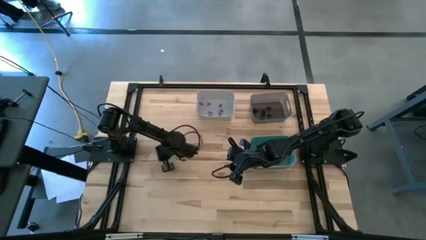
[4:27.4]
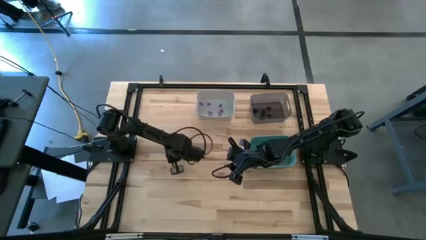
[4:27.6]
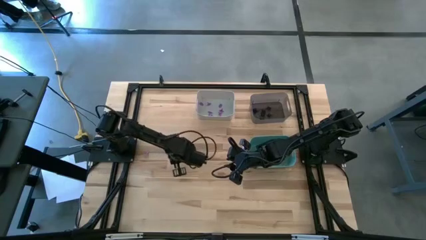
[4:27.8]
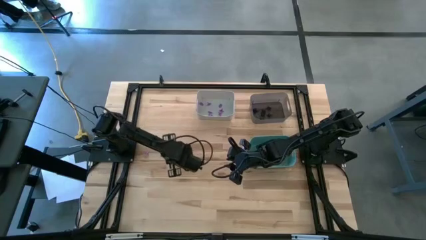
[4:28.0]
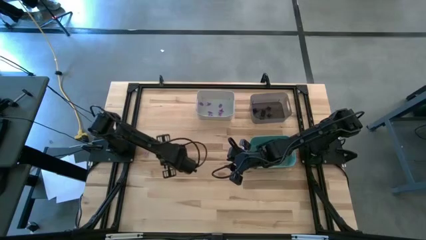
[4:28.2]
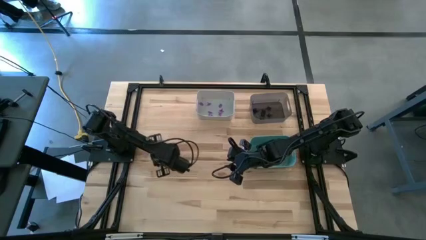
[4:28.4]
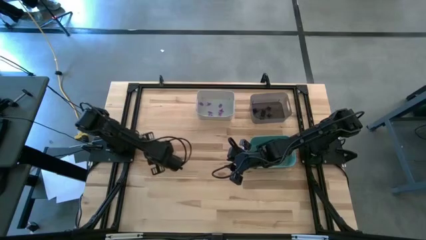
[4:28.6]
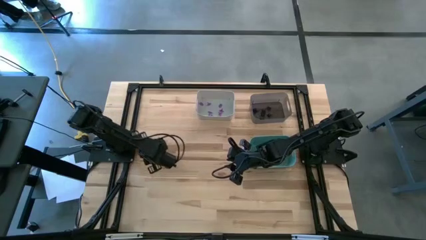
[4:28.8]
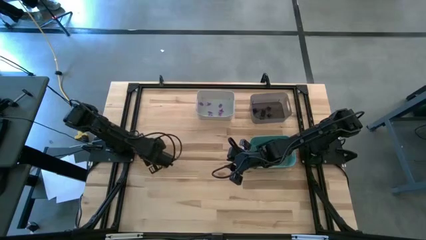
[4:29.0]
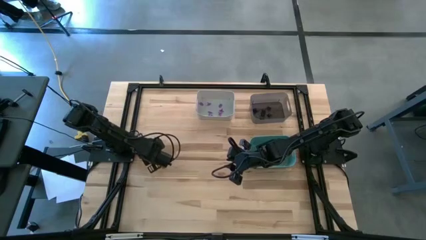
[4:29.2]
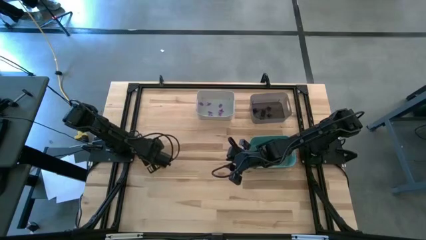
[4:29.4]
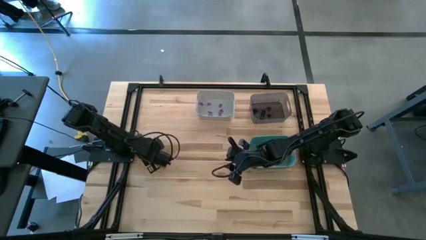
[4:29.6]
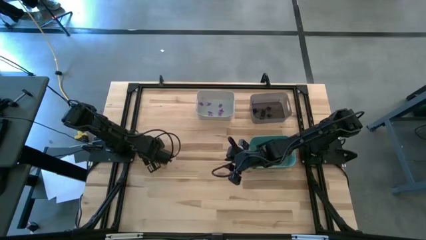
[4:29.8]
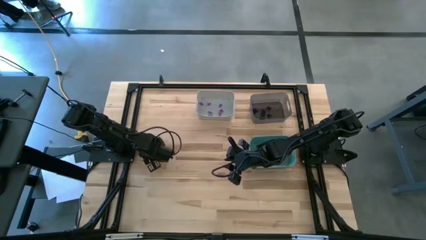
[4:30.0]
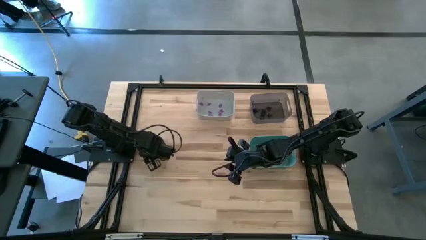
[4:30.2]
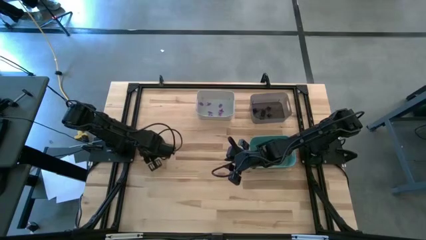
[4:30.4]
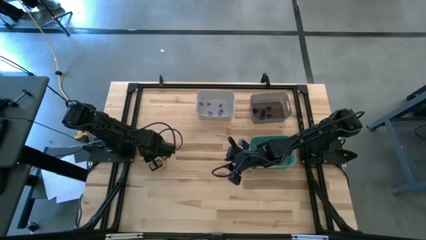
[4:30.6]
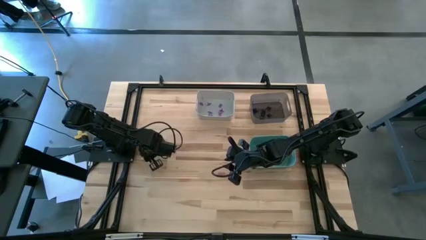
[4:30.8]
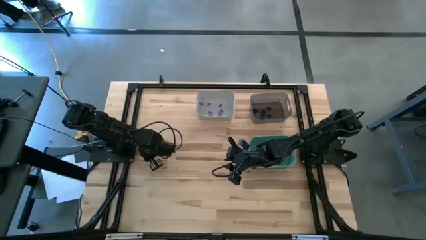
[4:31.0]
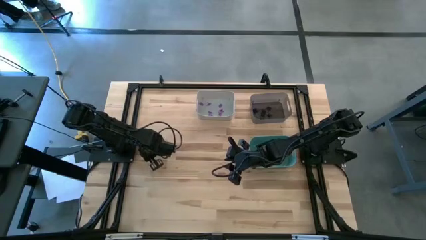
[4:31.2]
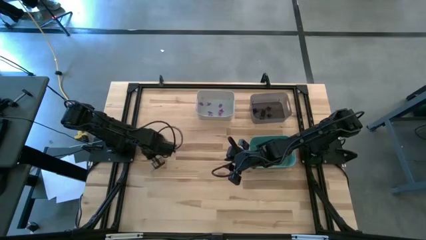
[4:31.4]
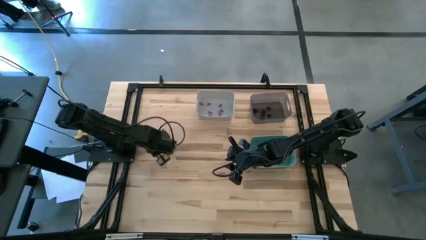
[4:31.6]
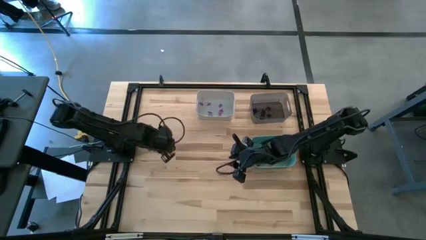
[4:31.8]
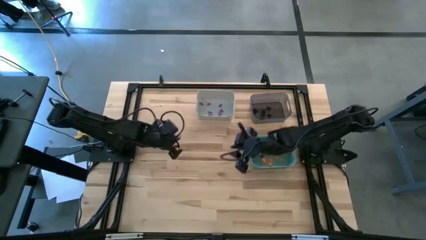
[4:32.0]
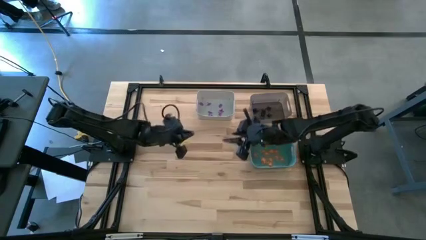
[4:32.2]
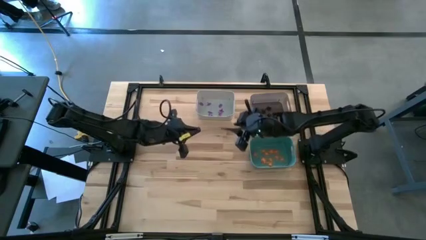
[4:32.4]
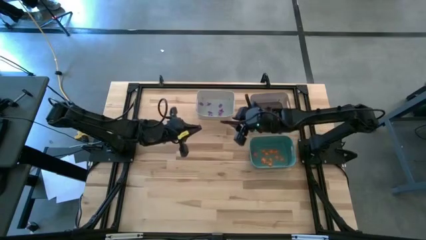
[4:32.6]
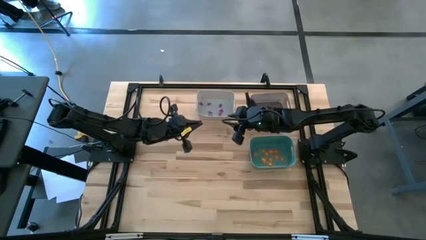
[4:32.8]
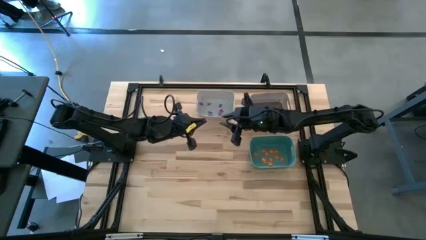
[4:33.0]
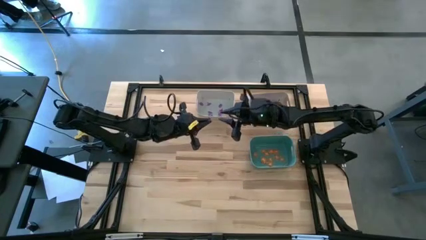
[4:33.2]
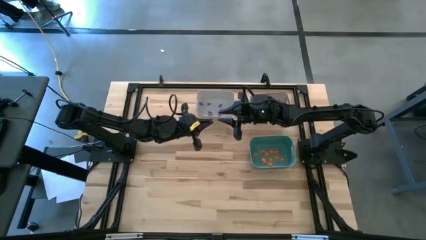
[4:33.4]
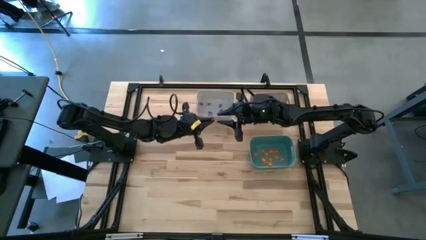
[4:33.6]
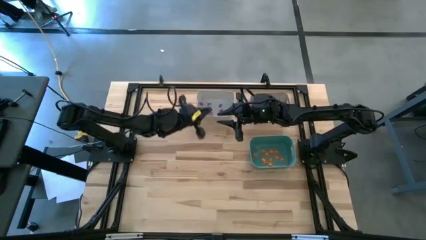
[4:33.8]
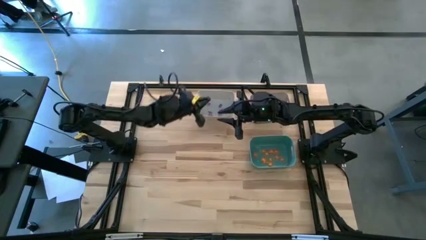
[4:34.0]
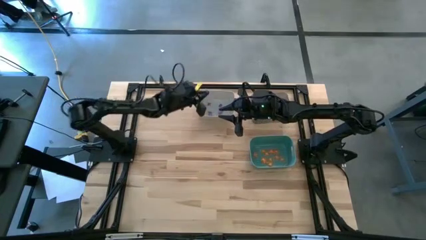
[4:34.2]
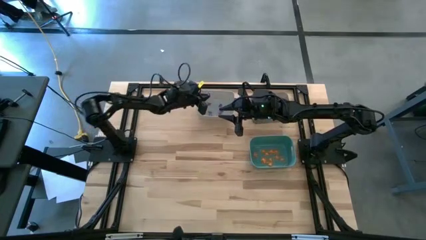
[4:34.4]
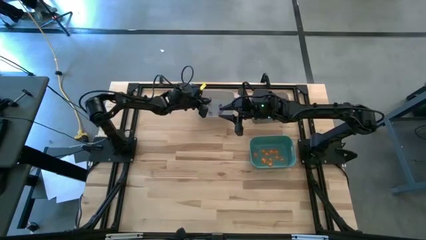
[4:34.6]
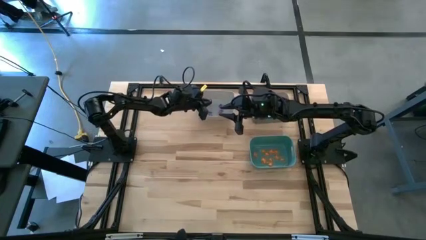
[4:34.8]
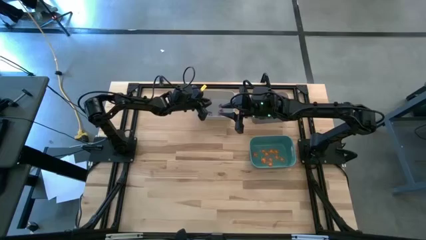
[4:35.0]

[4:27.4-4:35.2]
Task: Sort Halloween decoration
Put the purple witch hat toy into the white bin

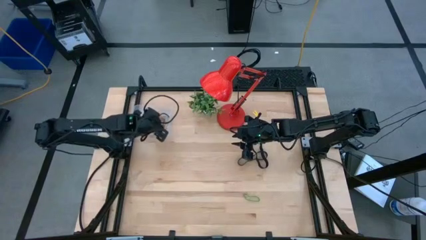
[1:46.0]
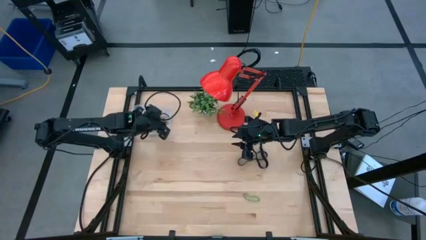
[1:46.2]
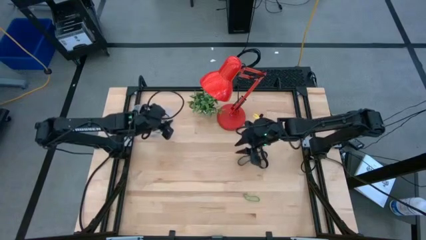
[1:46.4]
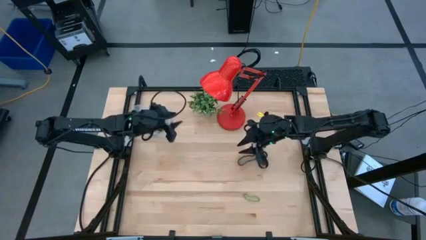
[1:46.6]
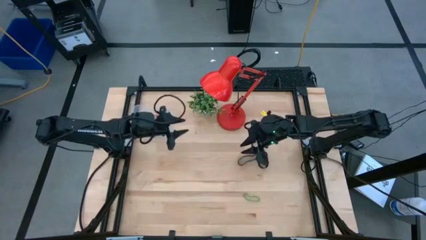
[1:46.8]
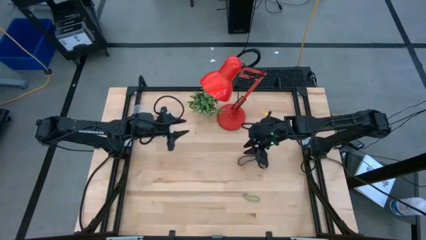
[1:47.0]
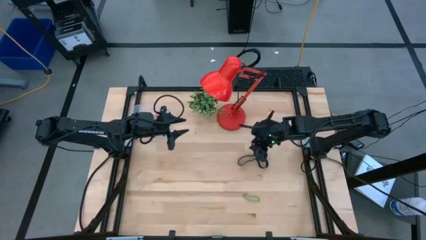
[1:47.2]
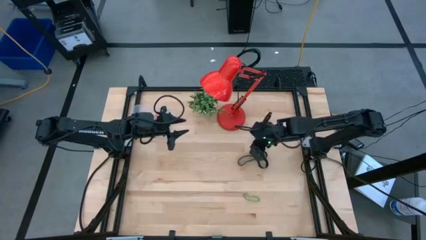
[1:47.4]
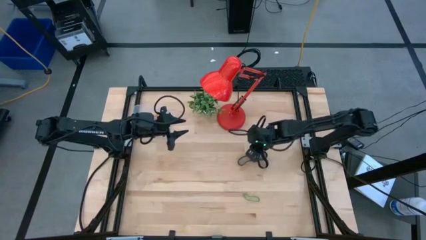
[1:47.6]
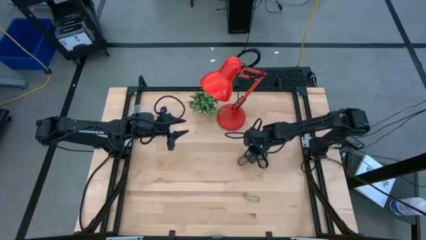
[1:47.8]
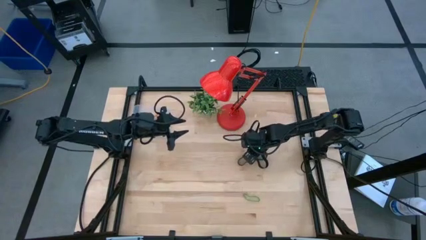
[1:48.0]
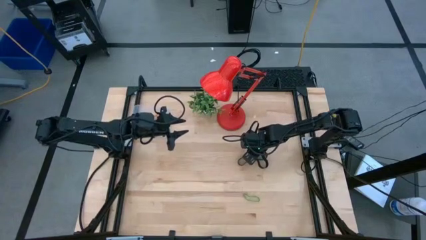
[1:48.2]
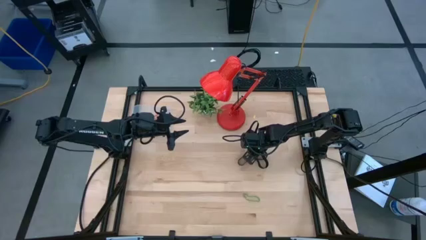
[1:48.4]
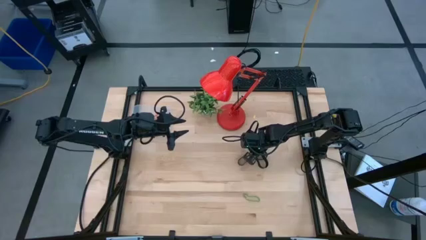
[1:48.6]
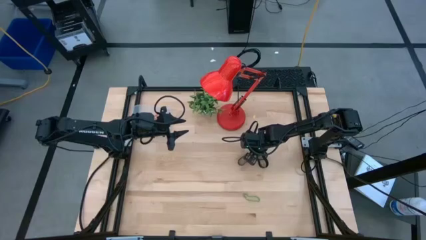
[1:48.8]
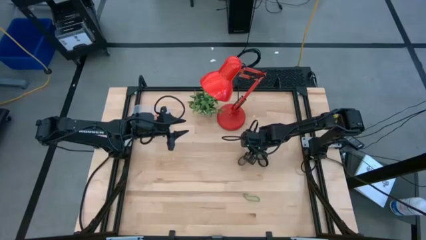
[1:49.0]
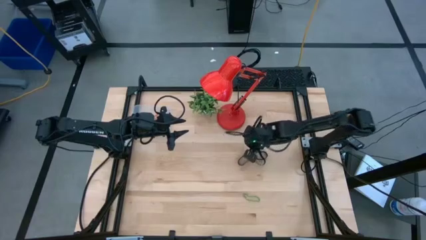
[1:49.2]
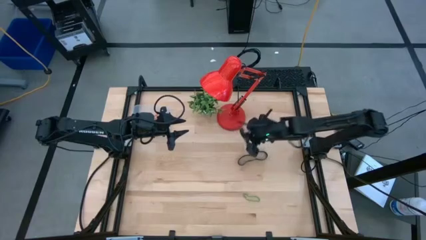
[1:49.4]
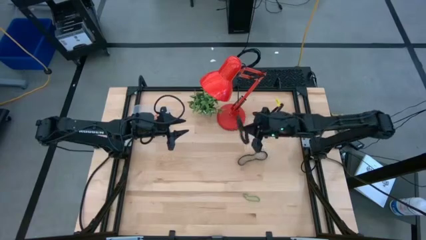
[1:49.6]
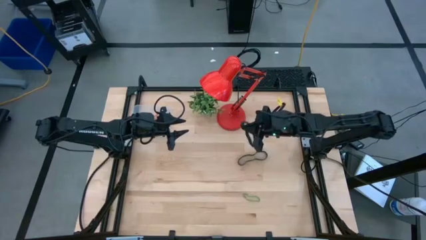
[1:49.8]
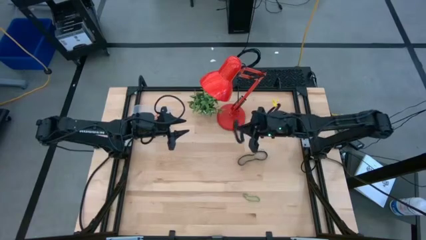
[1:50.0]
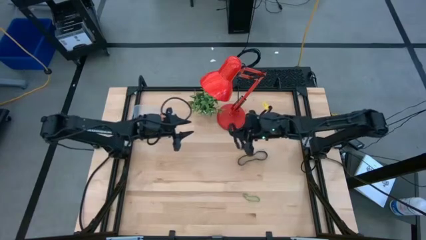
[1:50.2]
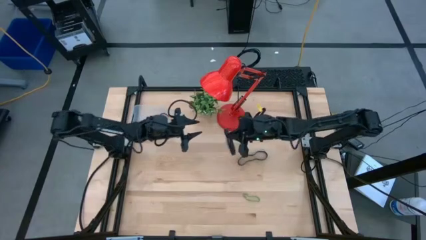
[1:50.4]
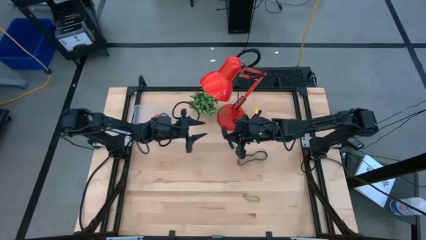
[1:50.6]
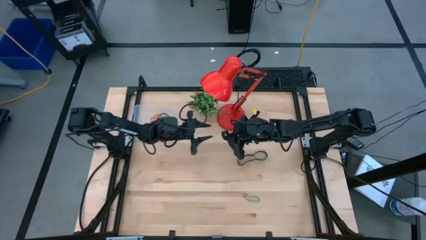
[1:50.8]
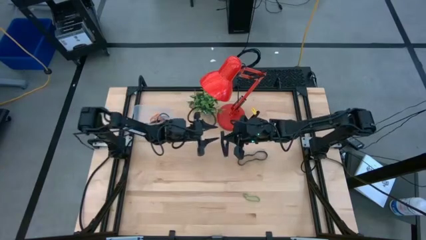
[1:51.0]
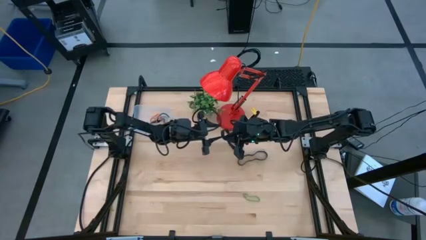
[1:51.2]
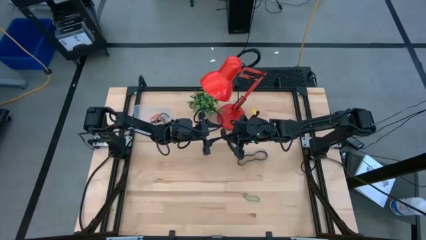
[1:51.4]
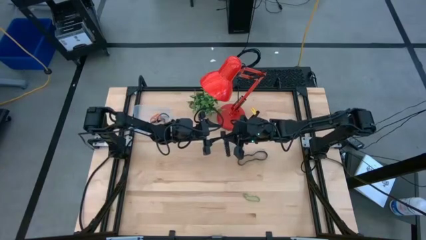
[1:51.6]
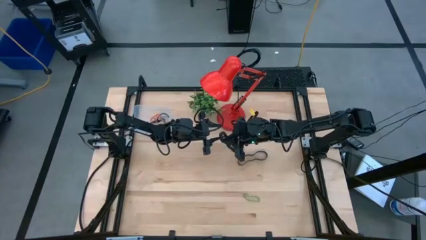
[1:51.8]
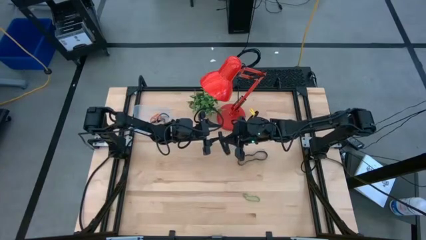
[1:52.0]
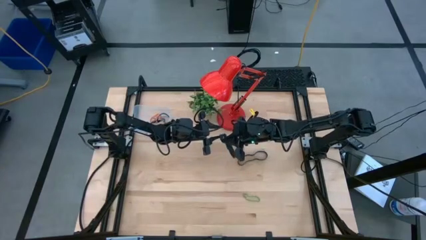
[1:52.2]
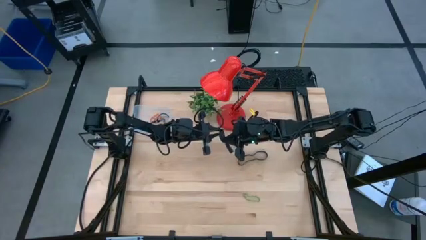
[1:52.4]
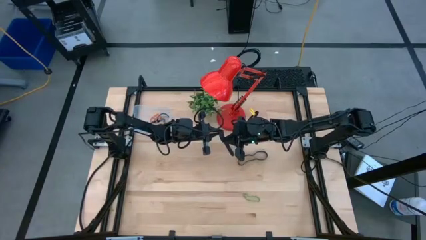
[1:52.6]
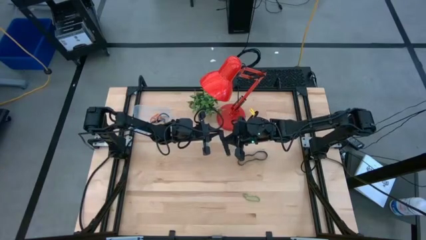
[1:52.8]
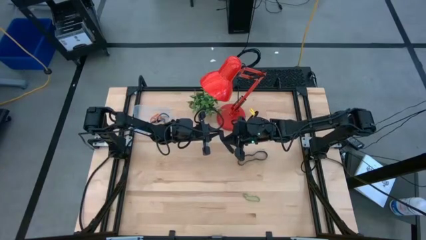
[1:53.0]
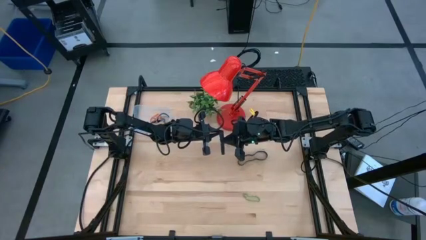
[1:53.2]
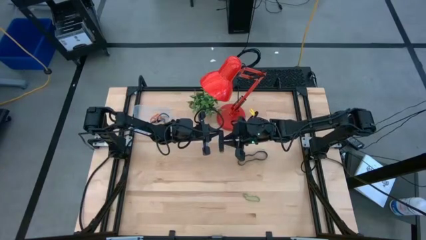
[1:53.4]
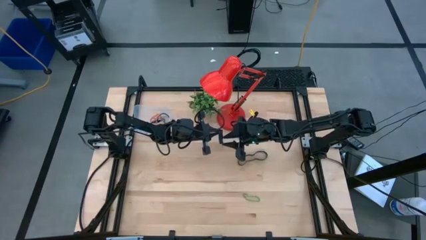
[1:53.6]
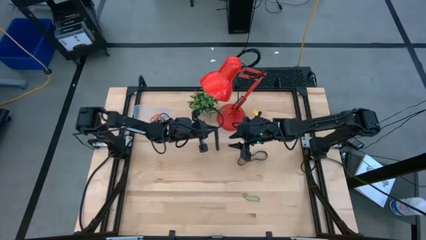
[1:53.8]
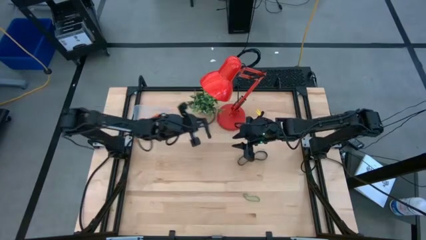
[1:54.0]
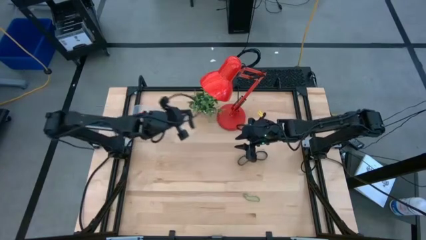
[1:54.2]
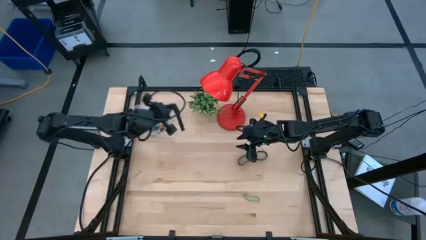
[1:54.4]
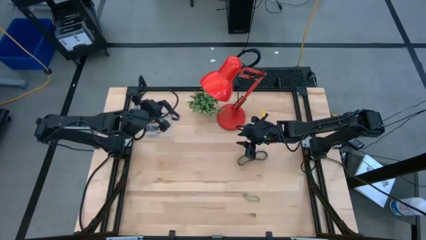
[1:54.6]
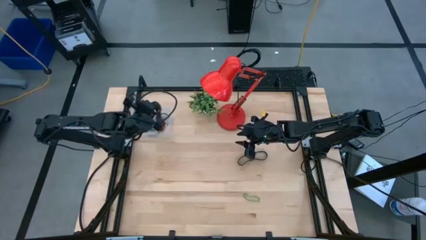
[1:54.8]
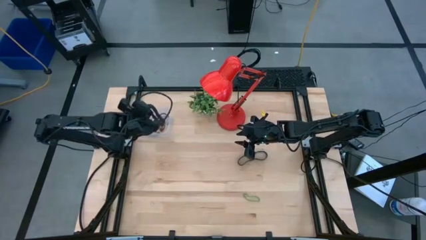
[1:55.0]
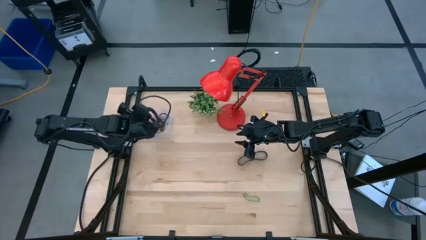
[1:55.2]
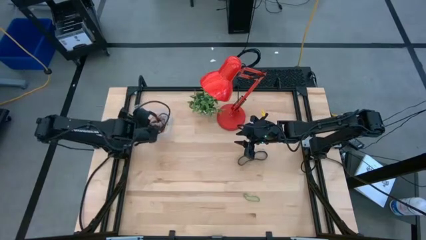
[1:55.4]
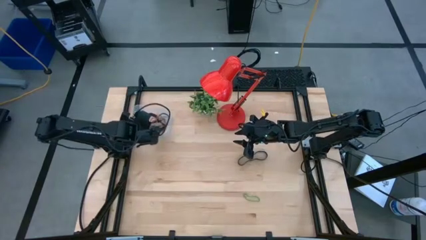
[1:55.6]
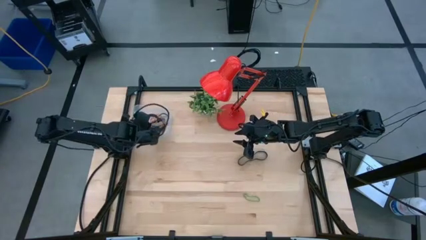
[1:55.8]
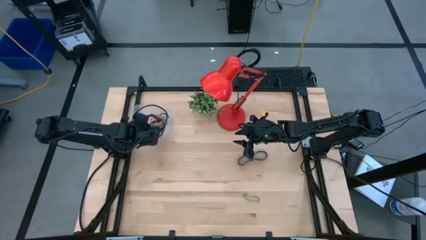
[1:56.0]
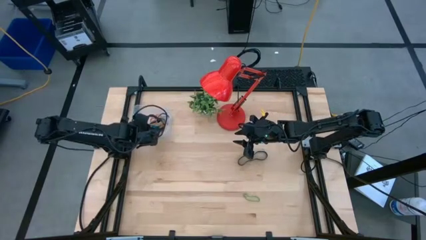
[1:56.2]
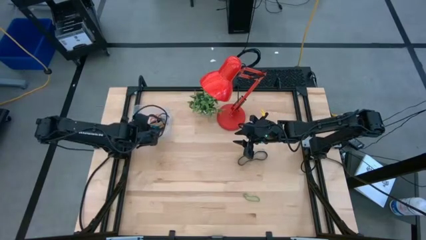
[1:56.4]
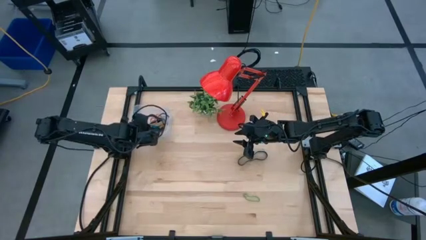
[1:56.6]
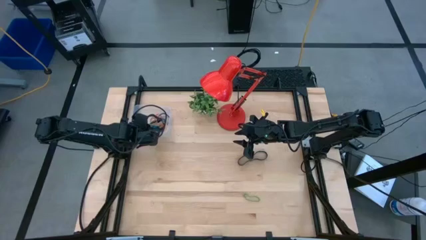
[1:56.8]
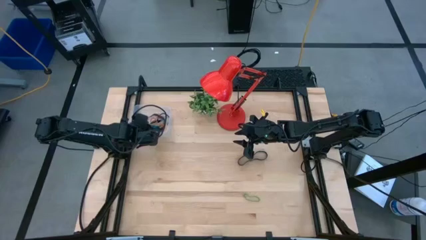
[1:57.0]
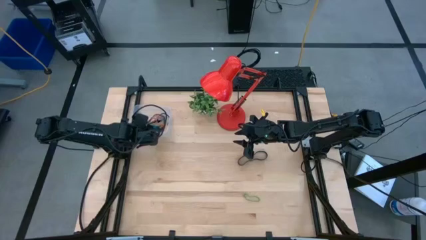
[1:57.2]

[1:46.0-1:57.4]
Task: Pick and place rubber bands into bin
Put the black rubber band into the transparent bin
